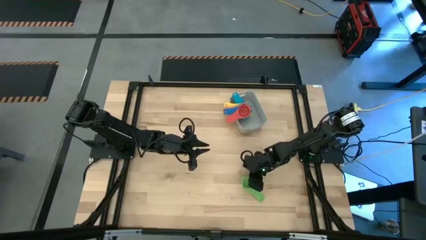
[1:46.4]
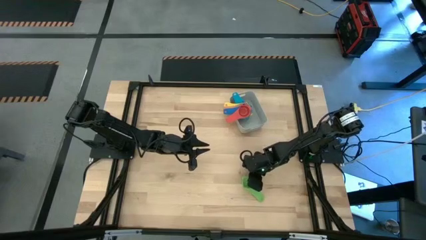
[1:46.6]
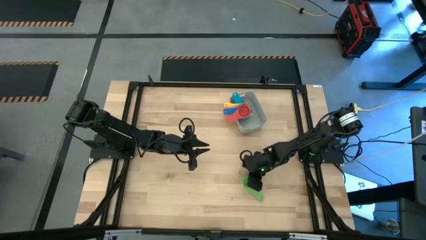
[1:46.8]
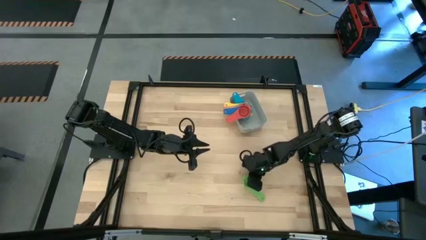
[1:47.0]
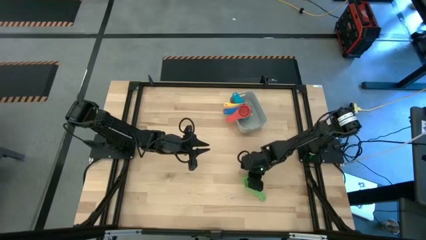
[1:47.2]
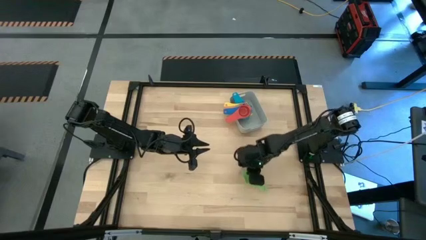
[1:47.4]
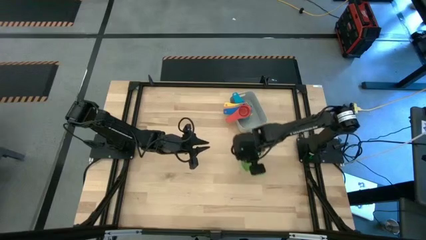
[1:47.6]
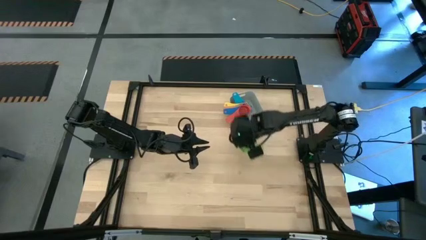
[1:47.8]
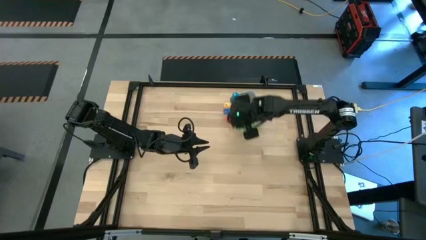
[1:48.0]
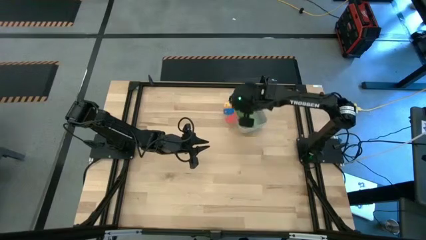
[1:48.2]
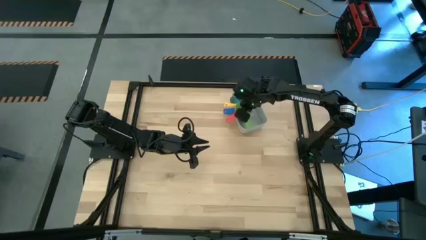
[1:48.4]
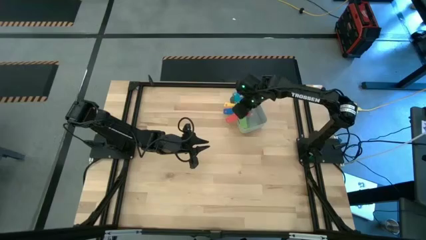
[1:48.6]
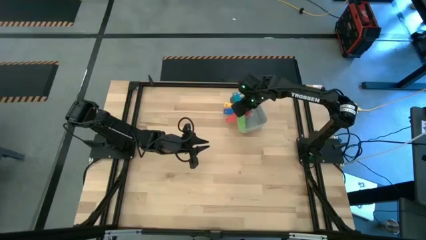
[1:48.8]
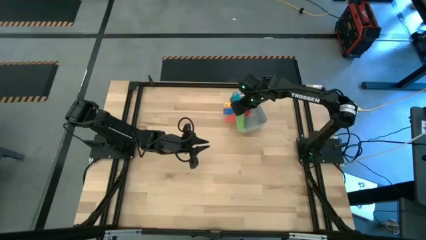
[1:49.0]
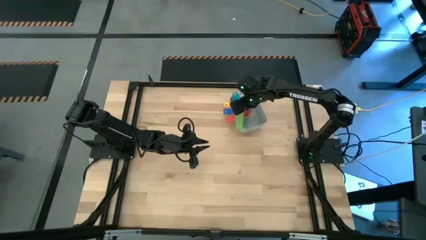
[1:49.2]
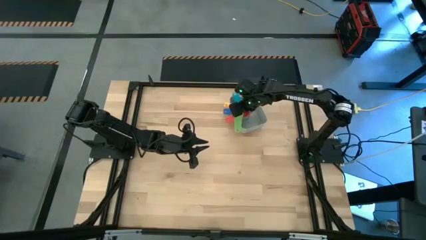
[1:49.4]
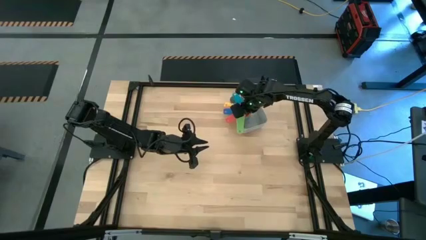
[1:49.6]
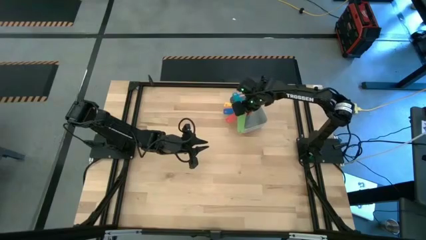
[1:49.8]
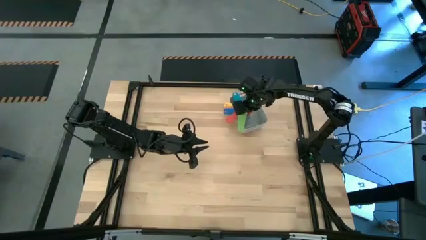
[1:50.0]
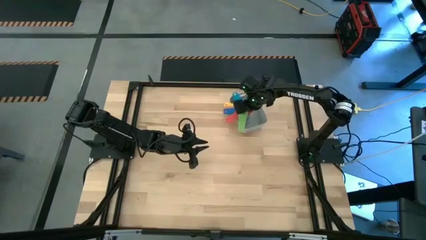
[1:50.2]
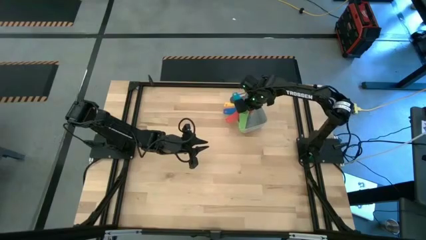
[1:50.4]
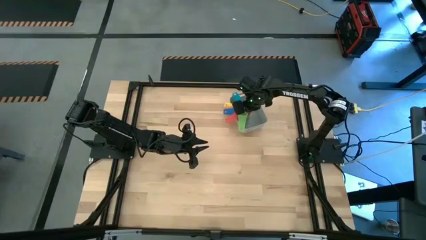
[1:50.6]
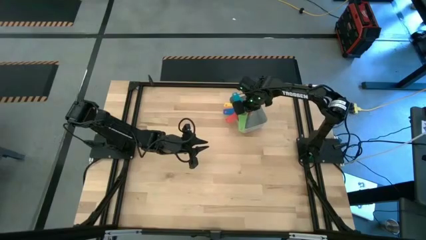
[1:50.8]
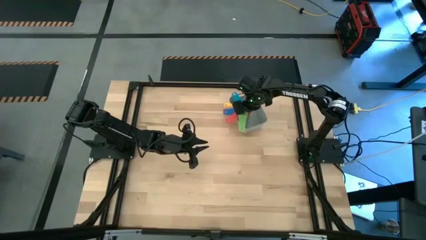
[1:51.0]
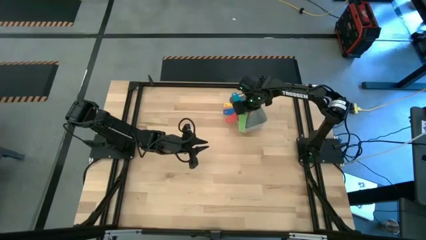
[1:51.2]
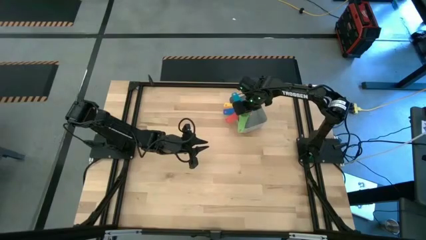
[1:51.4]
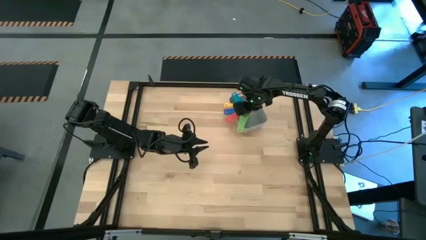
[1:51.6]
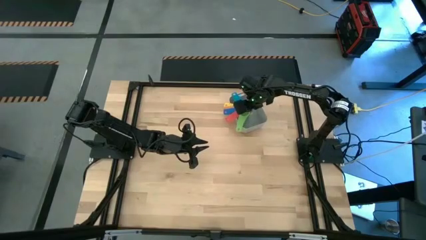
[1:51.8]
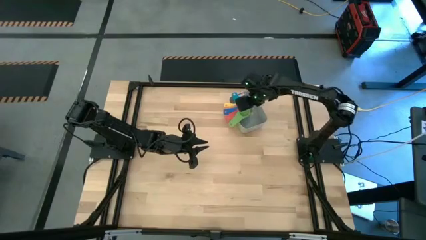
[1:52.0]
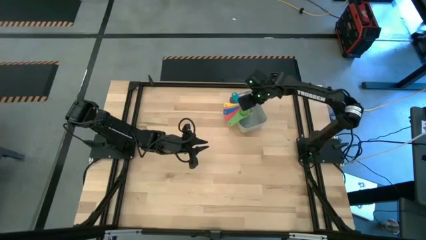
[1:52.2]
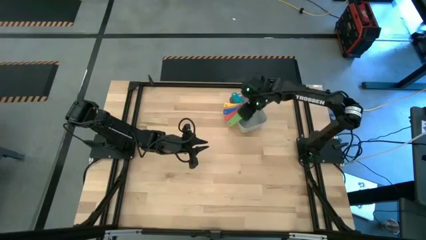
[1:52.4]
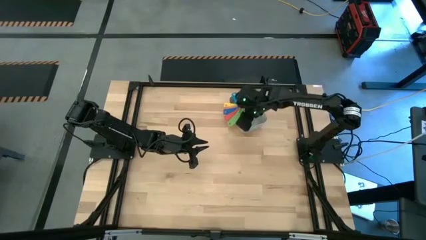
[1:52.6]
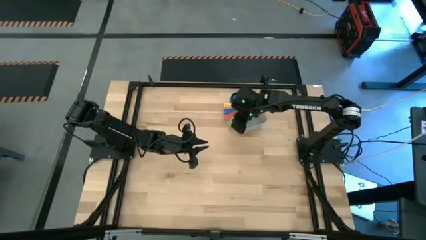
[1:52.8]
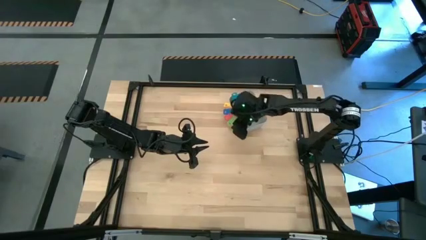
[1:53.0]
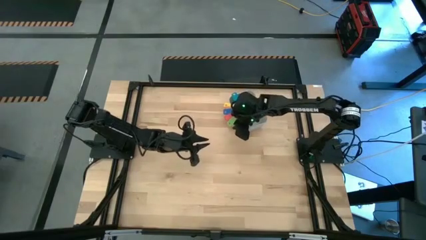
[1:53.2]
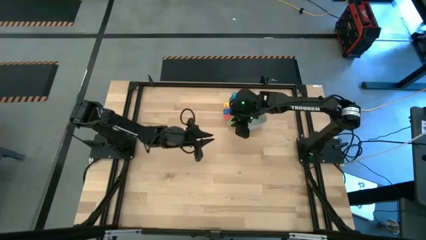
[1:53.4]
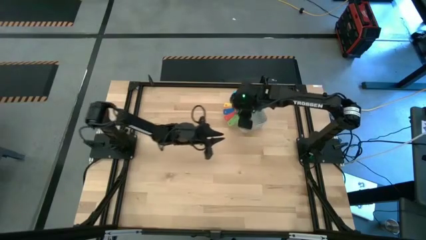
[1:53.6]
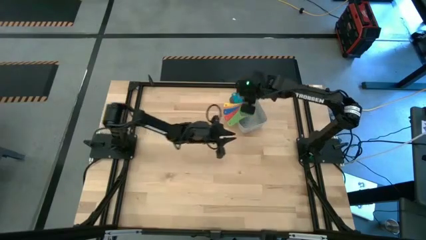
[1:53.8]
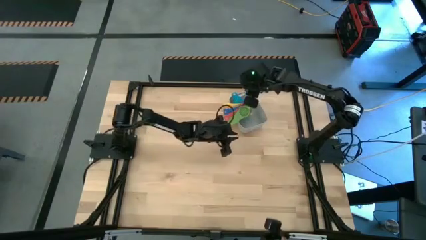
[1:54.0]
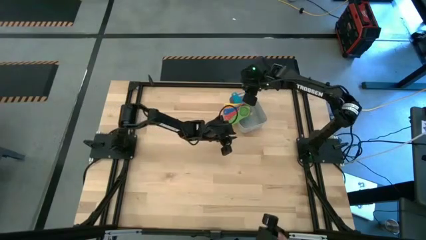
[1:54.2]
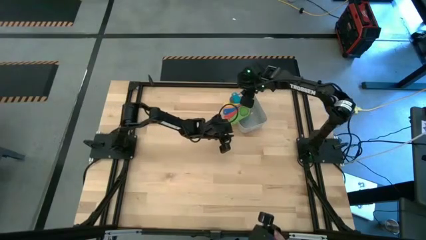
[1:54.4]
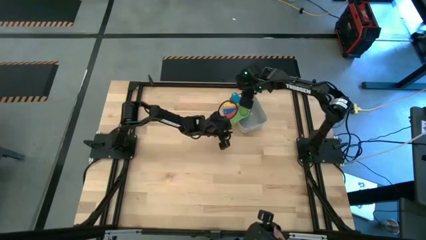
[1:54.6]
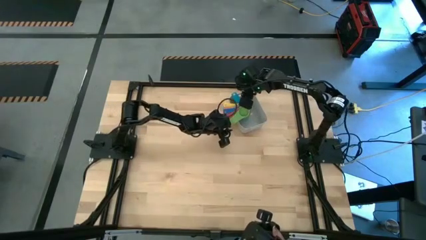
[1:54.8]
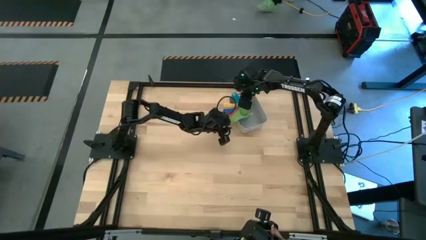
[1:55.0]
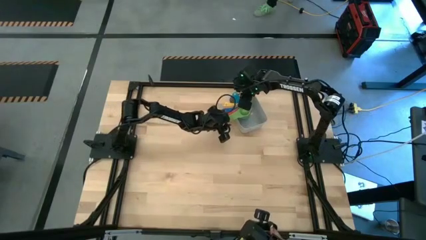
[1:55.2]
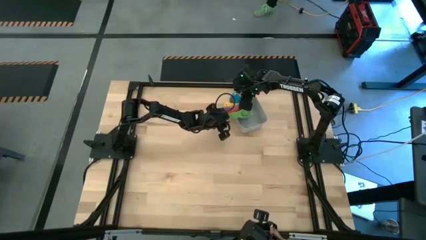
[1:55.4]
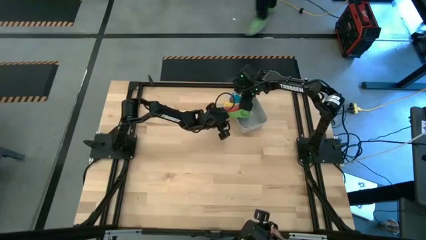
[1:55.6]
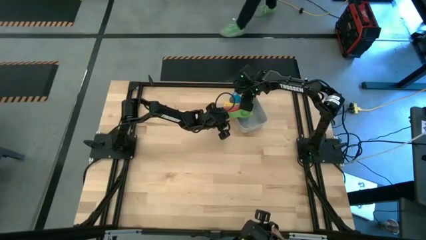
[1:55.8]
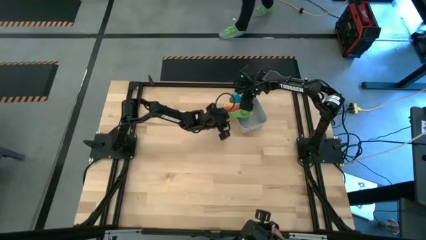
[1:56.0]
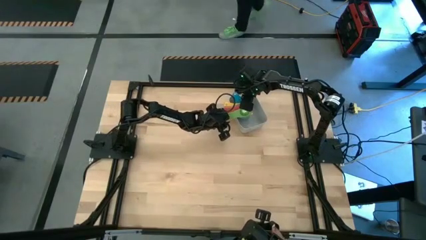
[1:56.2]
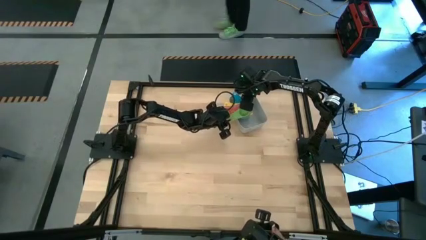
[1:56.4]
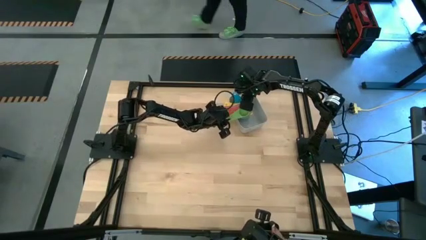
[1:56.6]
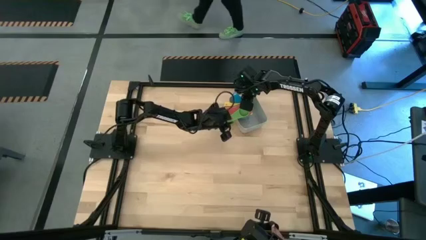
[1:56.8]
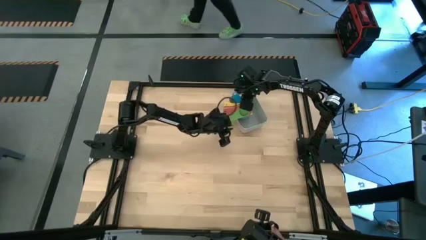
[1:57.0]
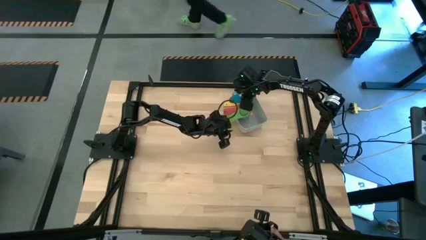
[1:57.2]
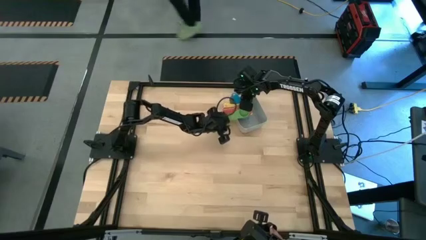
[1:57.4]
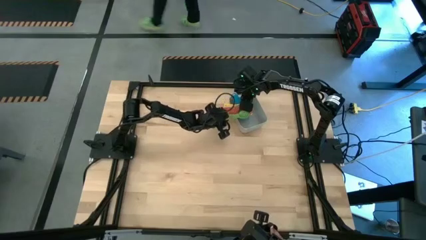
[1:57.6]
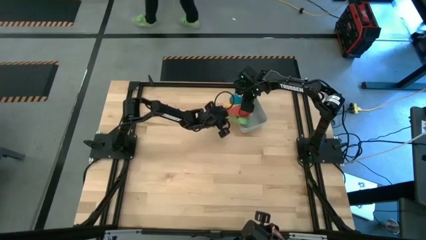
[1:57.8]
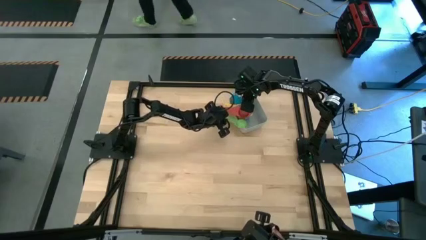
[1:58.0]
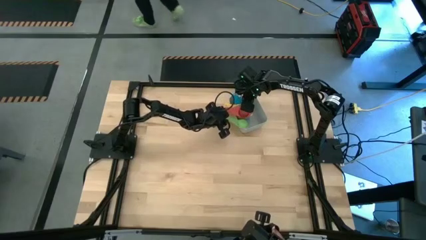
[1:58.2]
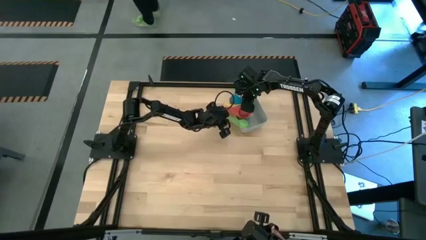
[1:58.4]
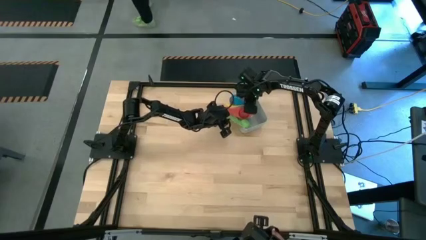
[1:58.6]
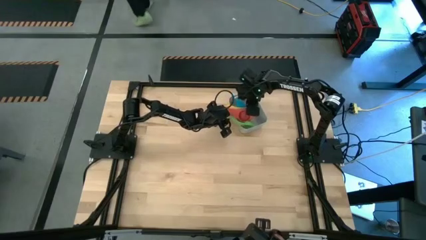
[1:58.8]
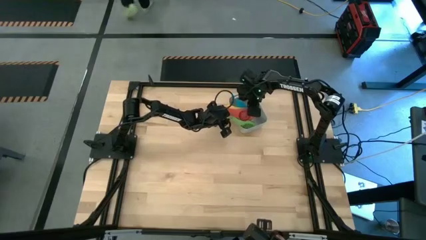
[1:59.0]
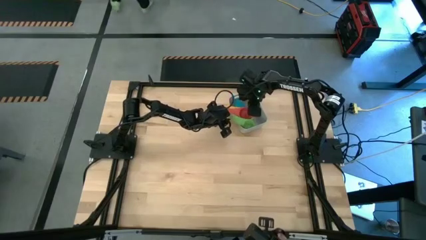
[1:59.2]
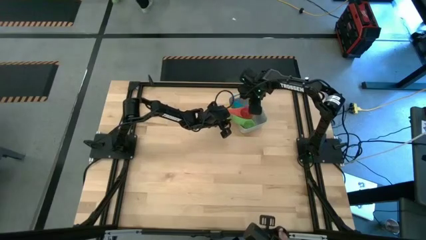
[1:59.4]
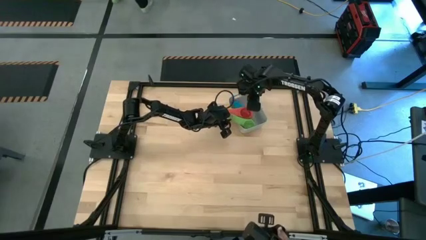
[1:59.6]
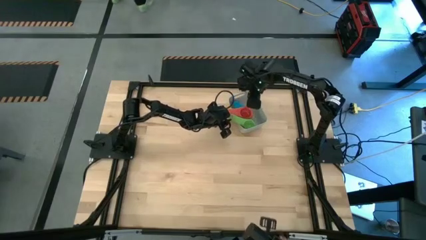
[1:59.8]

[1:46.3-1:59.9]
Task: Nest measuring cups in basket
Stack the green measuring cup on top of the red measuring cup into the gray bin

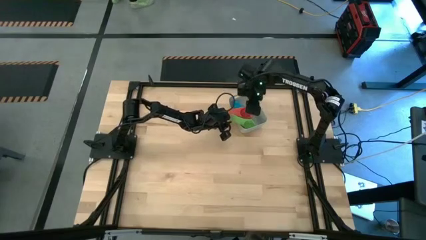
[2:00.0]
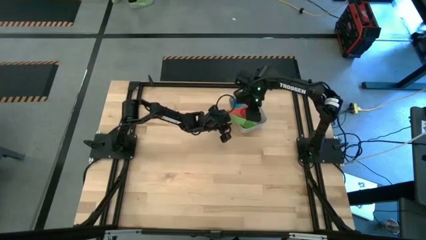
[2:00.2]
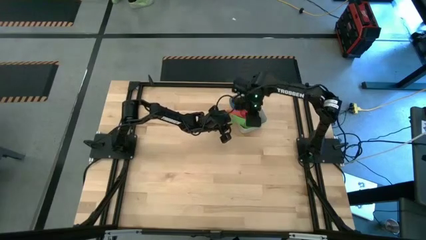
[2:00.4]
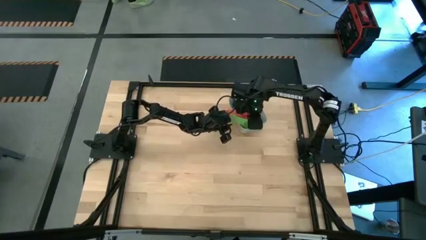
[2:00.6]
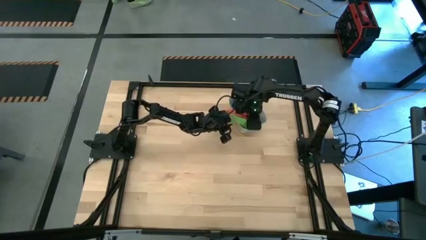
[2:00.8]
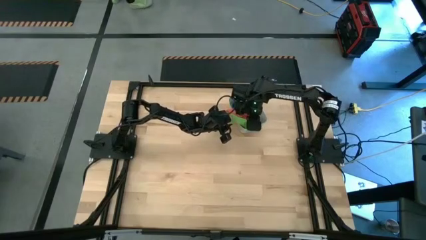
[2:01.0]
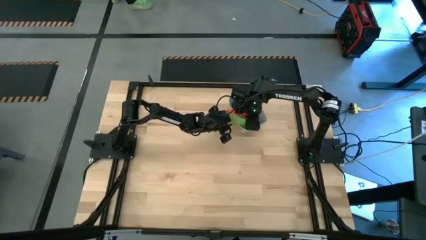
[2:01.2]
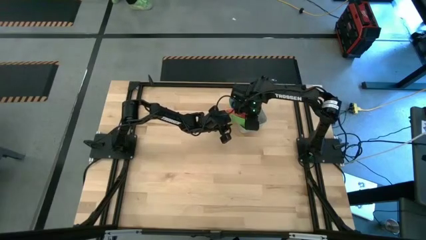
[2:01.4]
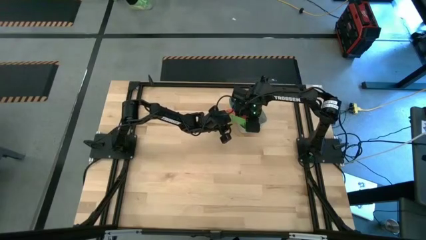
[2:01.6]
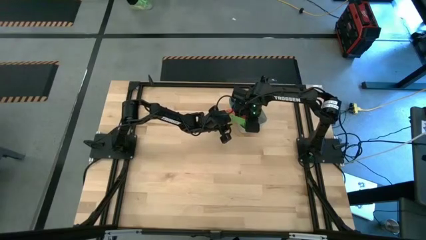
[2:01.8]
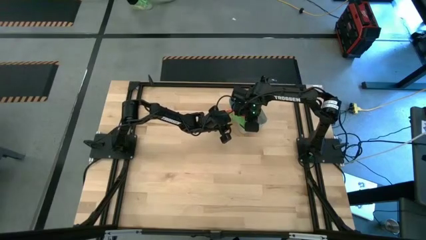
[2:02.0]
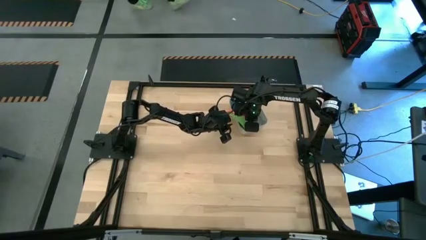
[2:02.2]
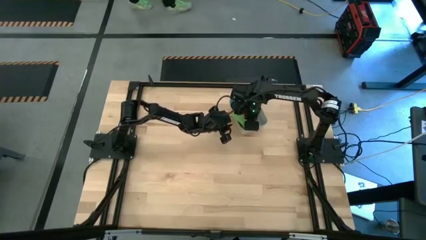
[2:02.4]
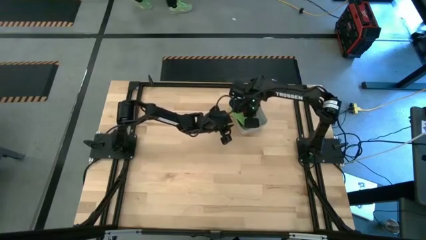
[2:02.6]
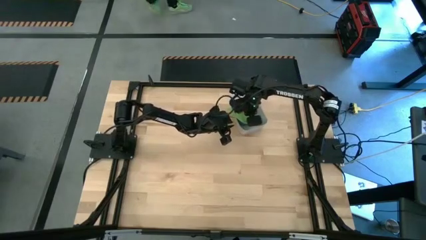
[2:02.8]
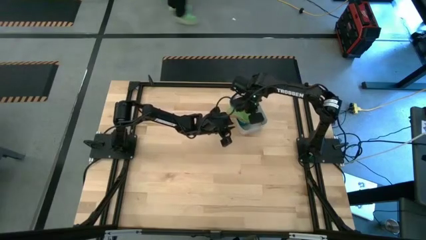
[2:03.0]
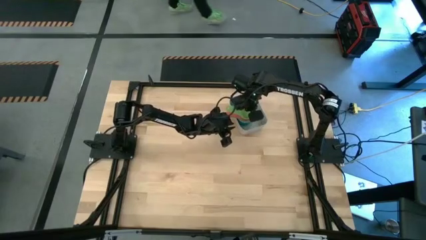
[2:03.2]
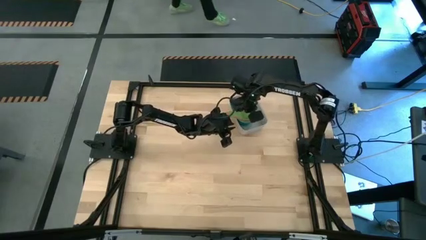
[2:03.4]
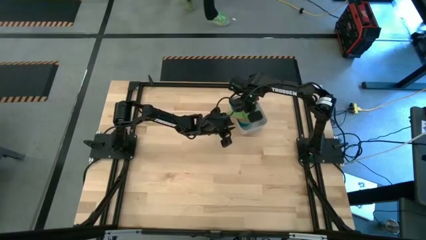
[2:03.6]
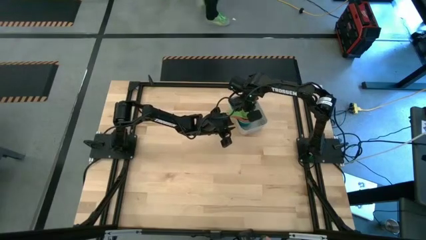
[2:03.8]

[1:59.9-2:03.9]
Stack the green measuring cup on top of the red measuring cup into the gray bin
